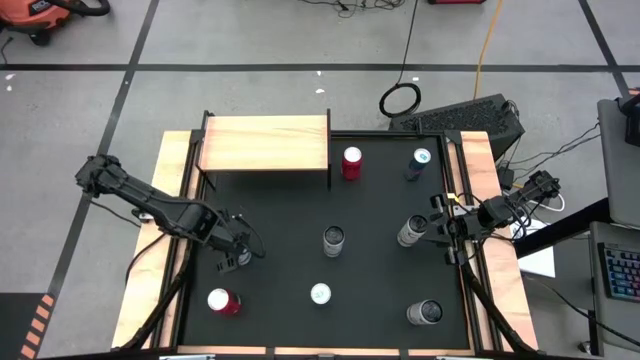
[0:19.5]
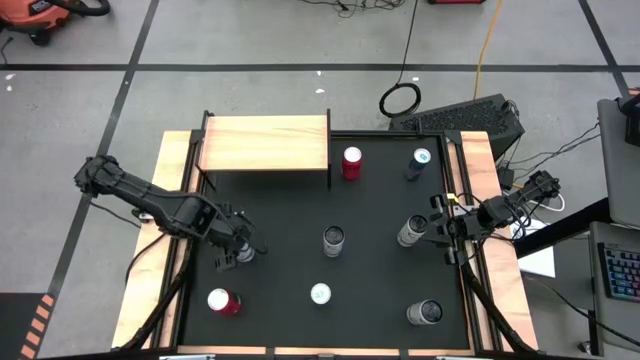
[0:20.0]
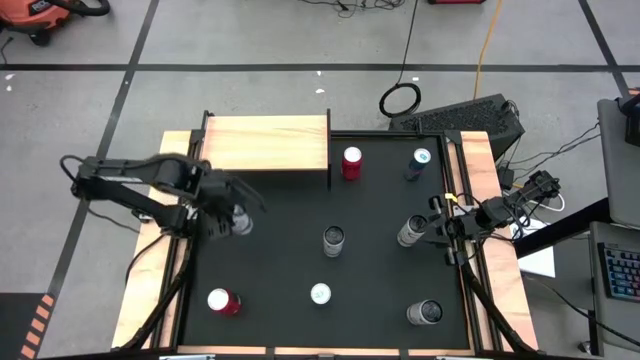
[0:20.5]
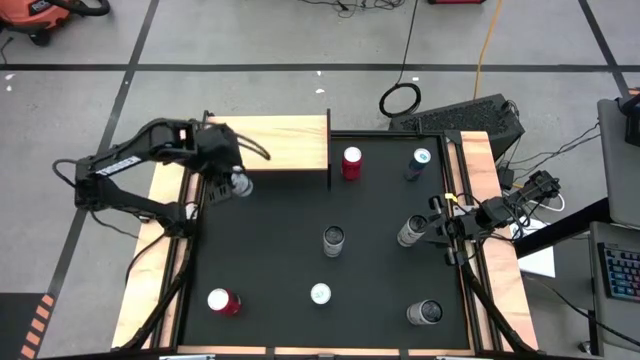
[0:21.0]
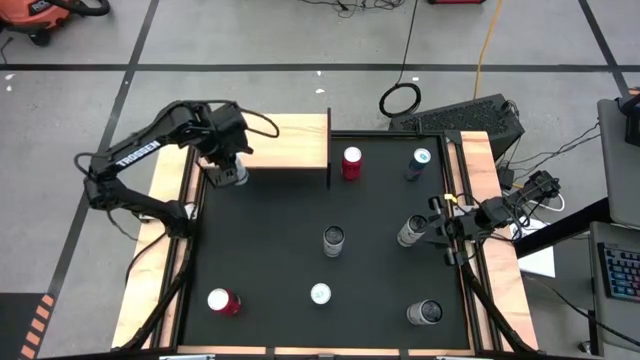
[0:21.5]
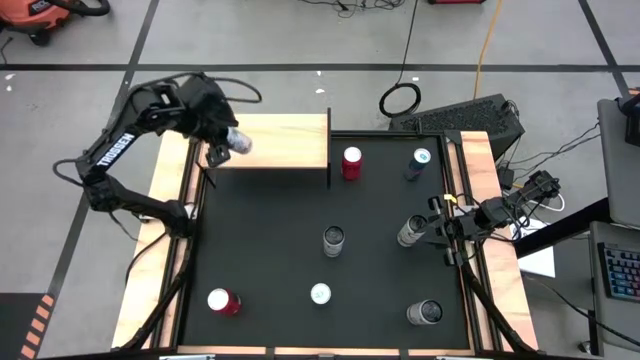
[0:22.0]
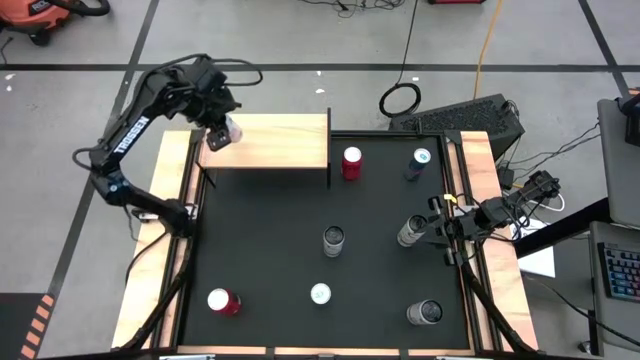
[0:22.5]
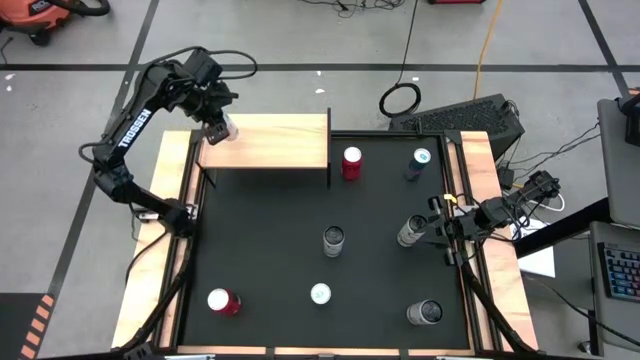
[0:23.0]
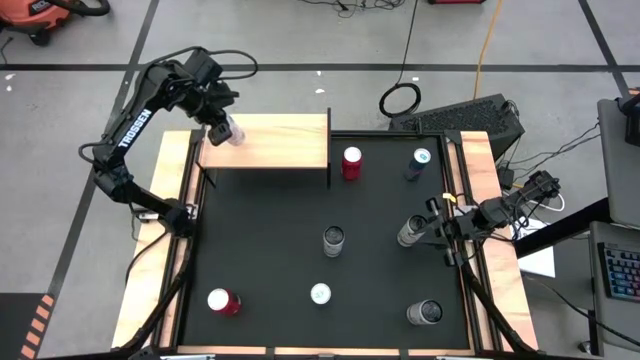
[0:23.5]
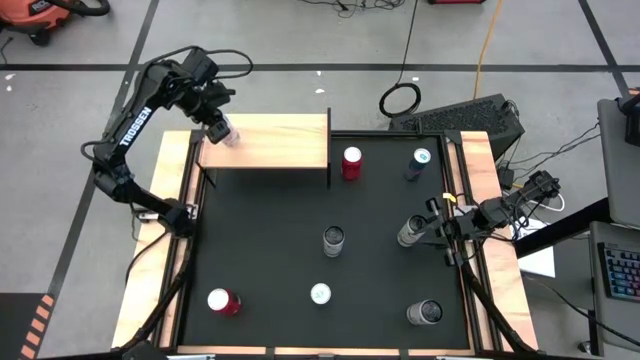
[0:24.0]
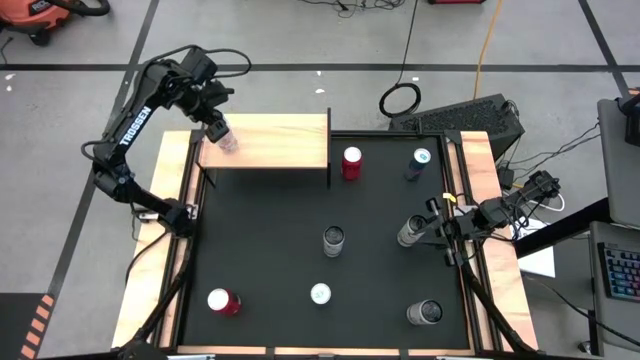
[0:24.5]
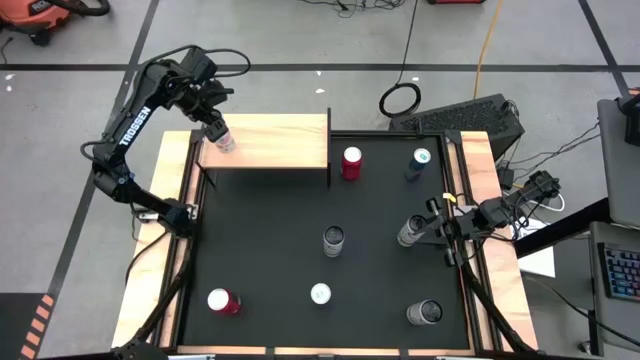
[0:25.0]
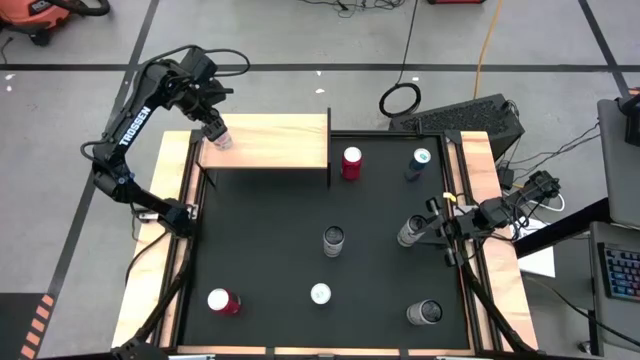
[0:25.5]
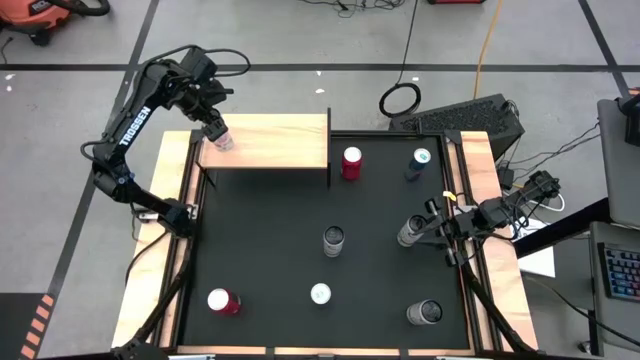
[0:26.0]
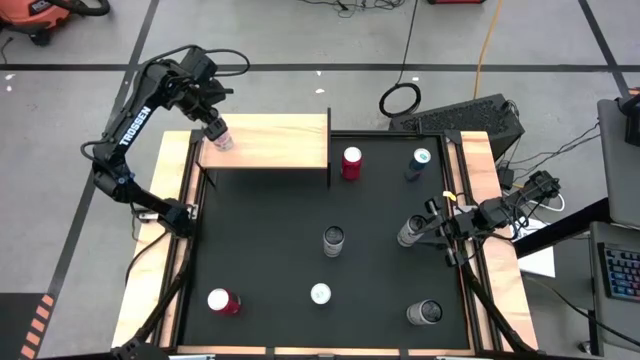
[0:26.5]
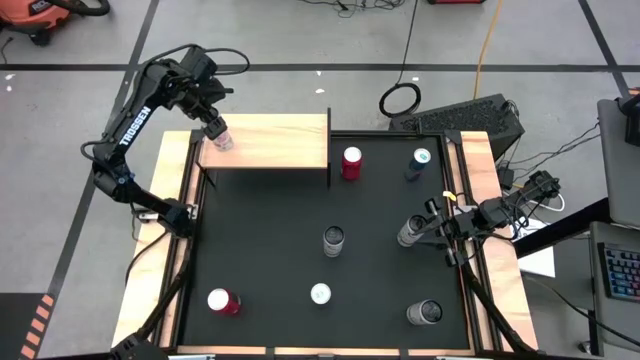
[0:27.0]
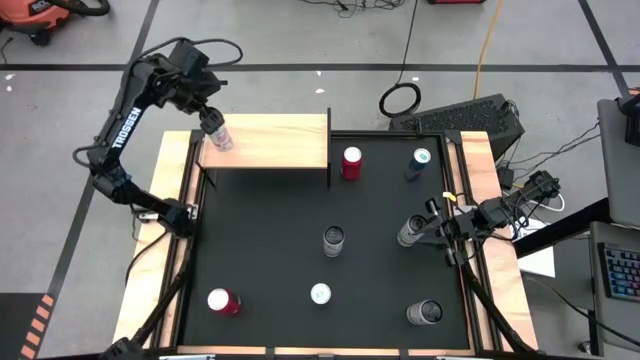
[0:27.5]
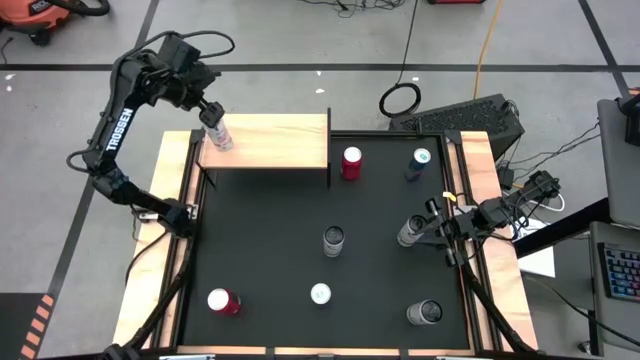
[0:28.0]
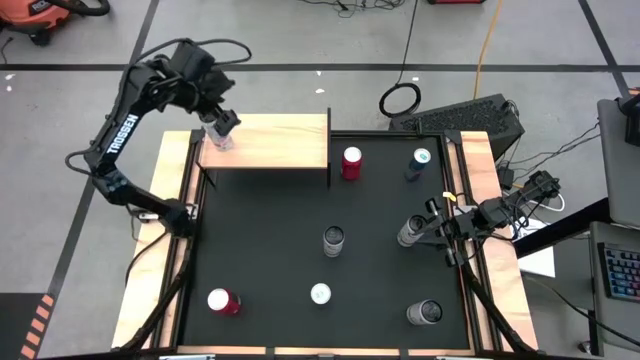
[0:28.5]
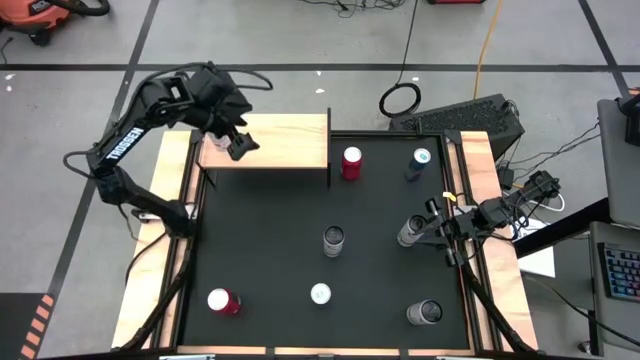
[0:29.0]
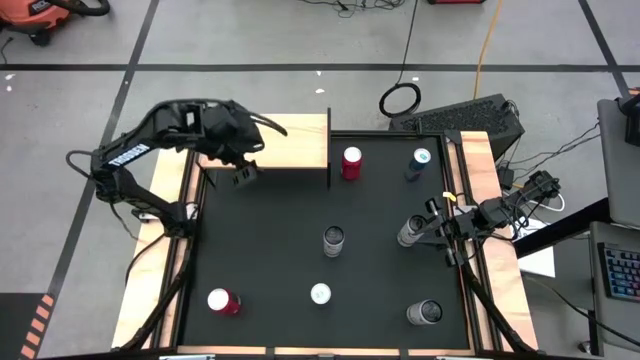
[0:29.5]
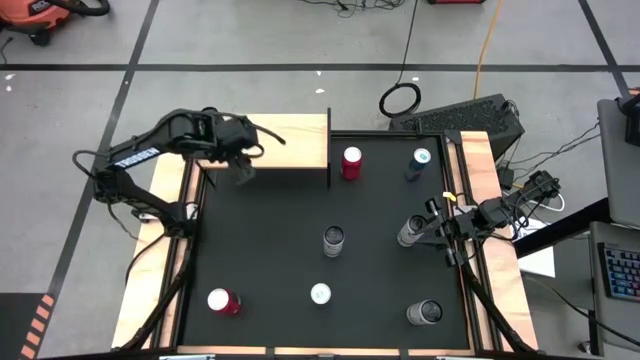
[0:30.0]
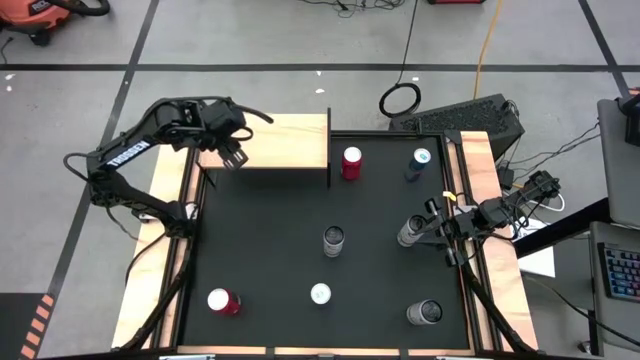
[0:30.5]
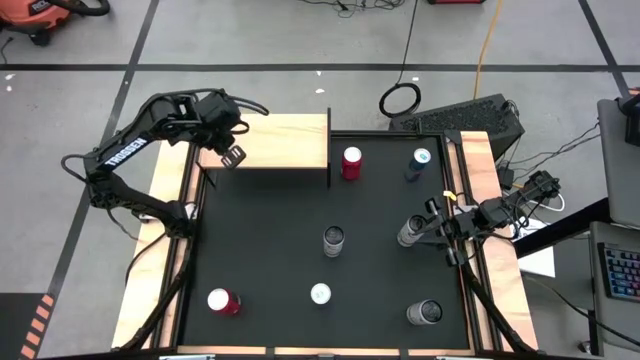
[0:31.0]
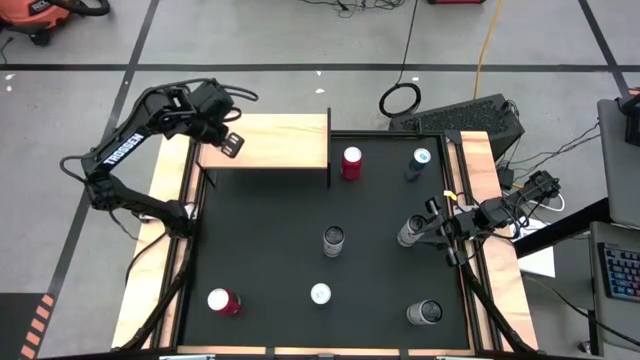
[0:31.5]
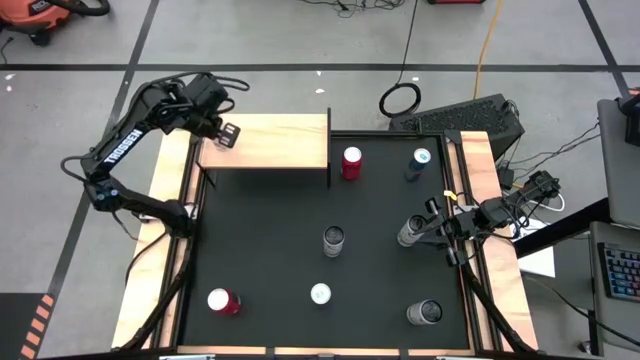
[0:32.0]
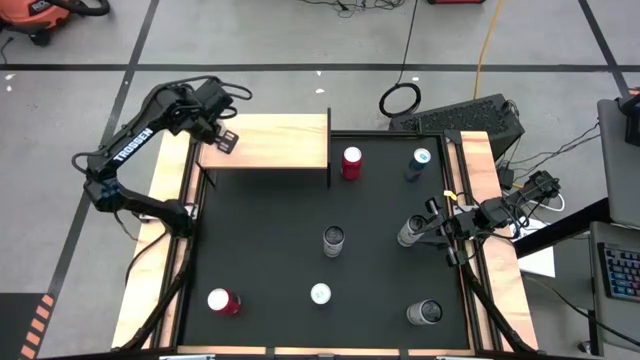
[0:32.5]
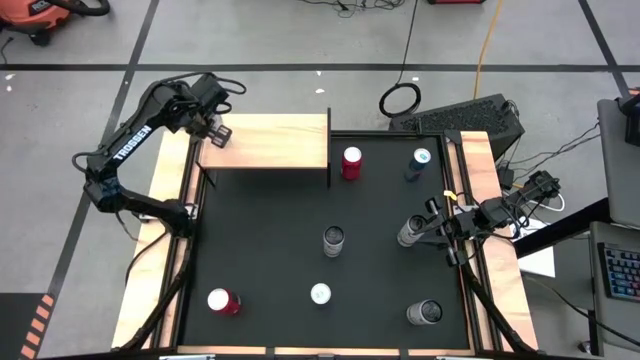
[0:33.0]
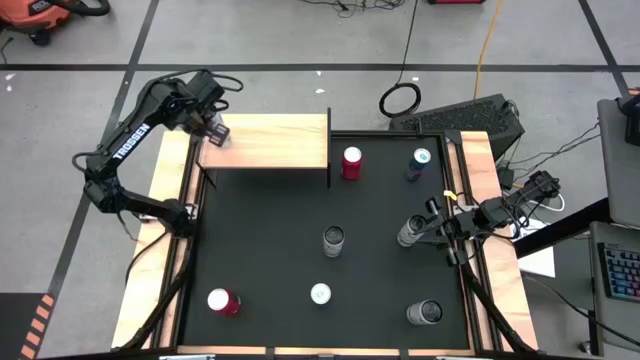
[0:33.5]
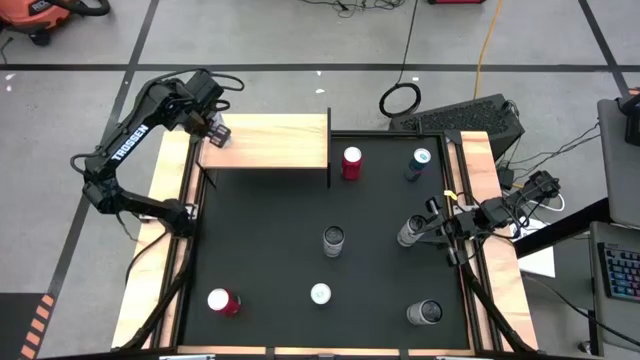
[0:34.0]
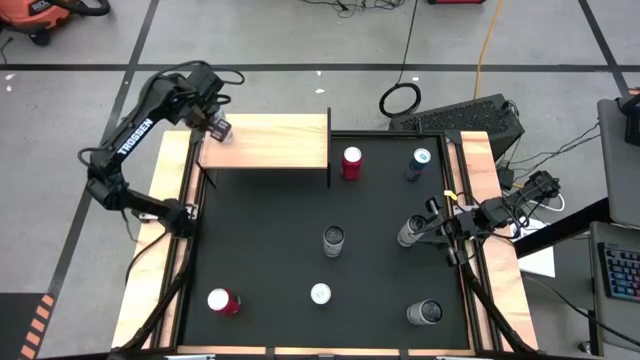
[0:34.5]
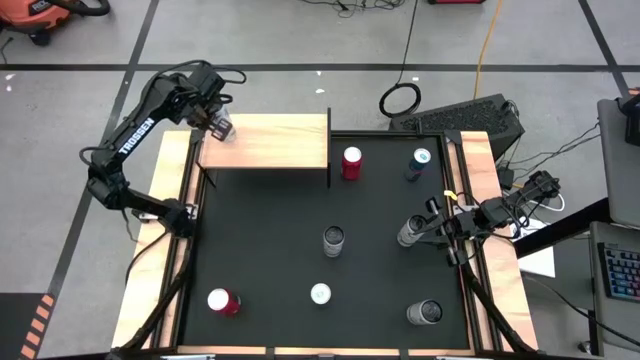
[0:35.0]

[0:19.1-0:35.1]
Task: Place canned beverage on shelf
Put the left white pink soda can on the shelf

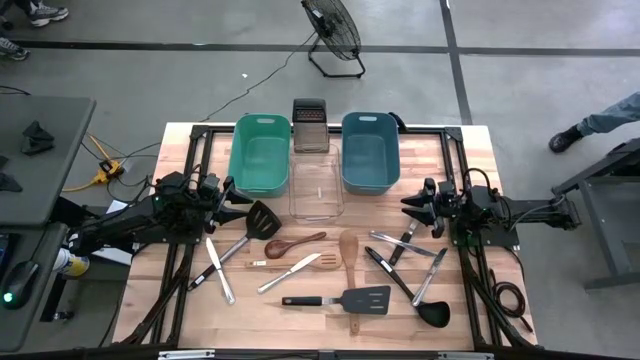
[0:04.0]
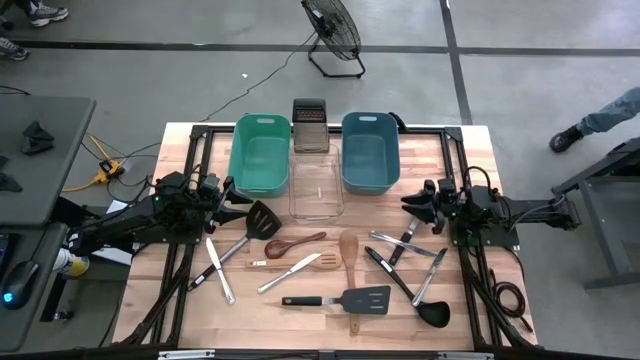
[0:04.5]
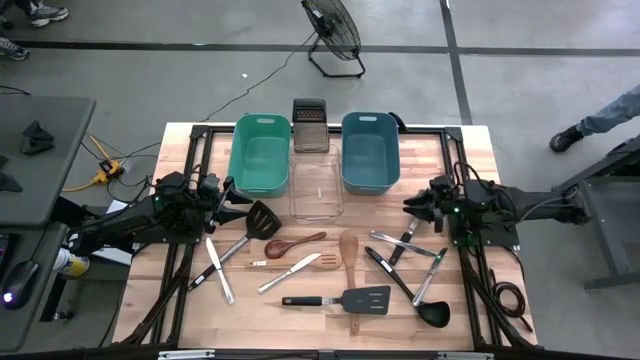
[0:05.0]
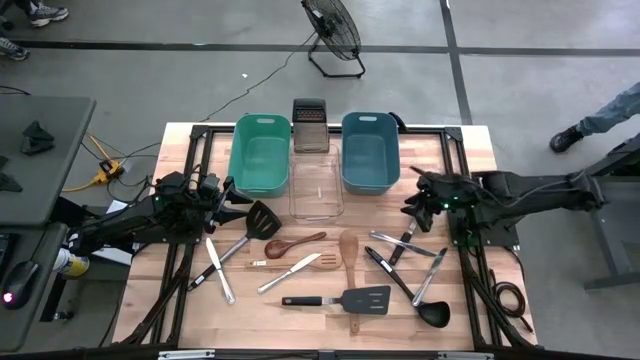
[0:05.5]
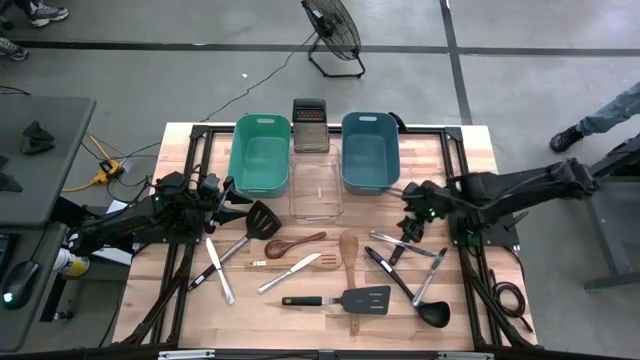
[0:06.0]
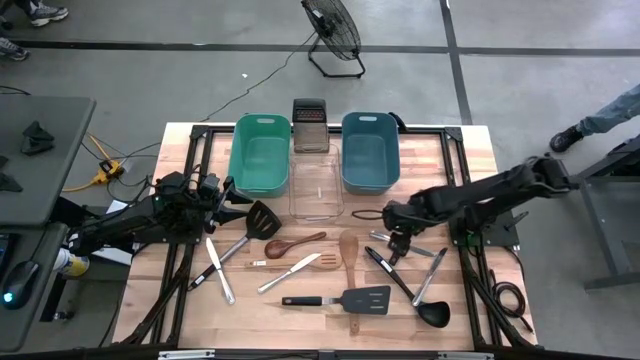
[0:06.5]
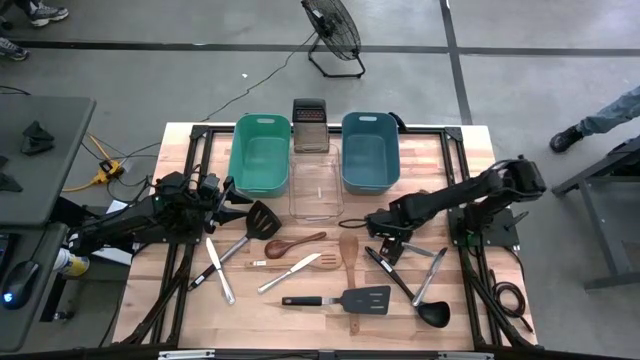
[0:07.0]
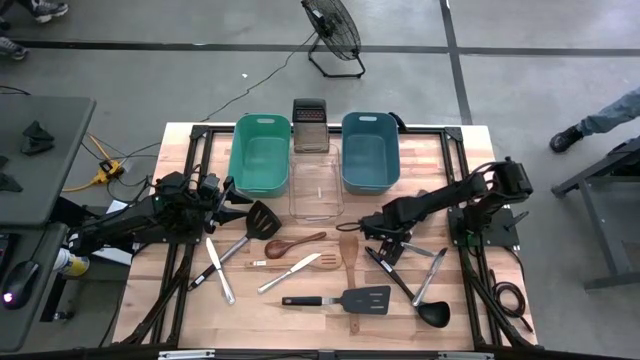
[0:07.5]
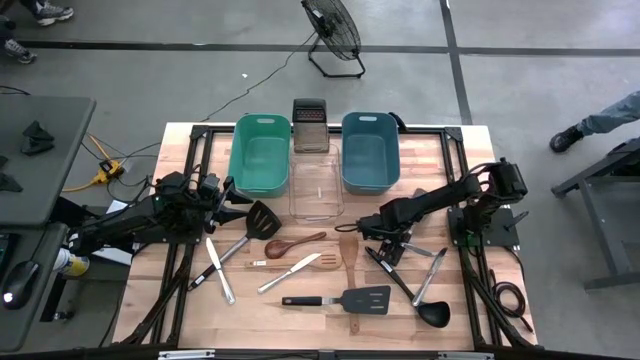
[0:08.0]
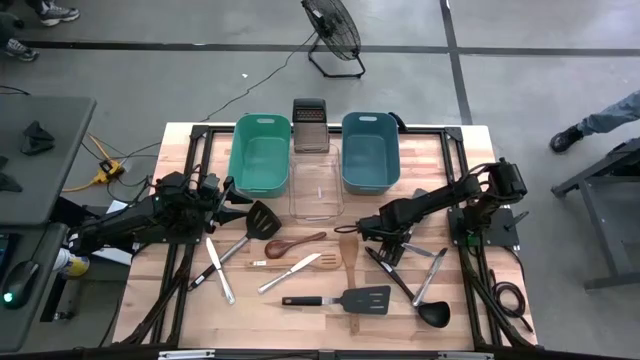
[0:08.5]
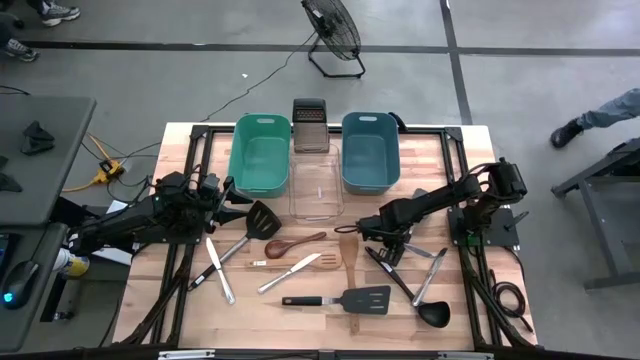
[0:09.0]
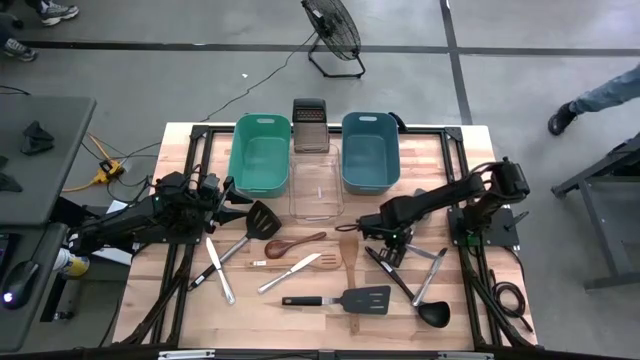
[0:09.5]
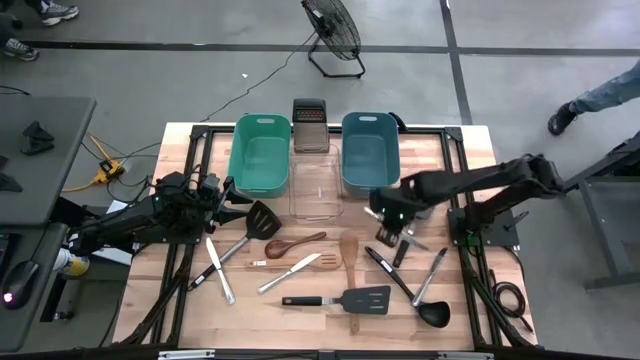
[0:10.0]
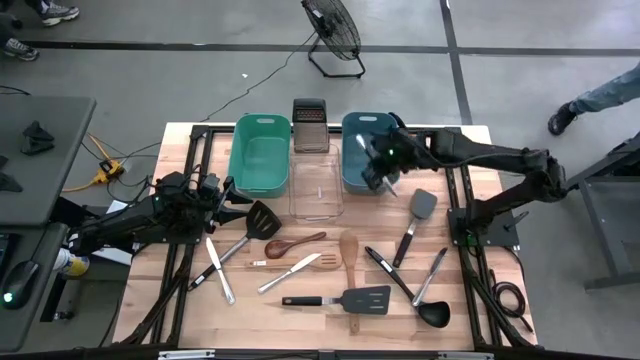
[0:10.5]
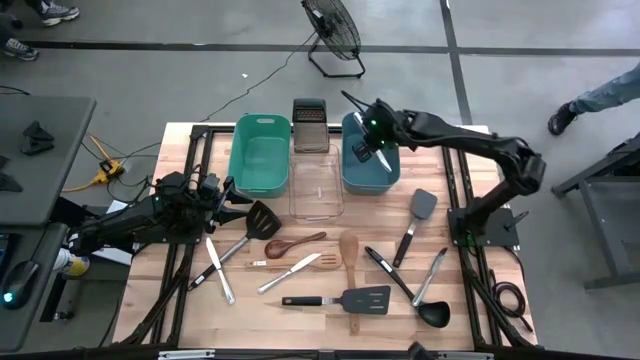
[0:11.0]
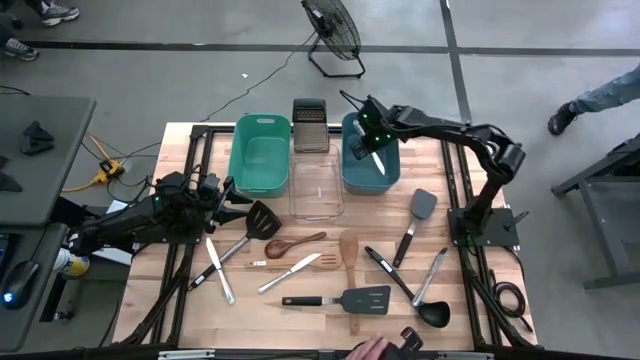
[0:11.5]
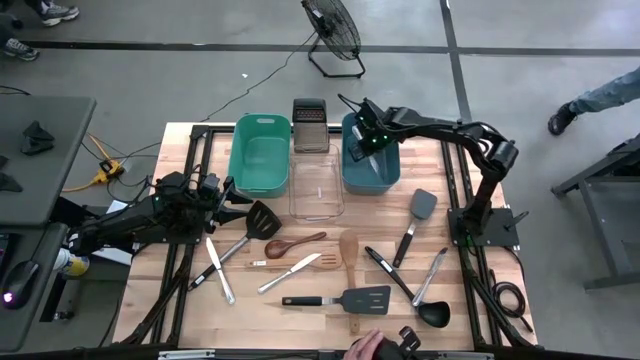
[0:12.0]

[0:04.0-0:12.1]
Task: Pick & Place Kitchen Items
Put the table knife into the blue bin
